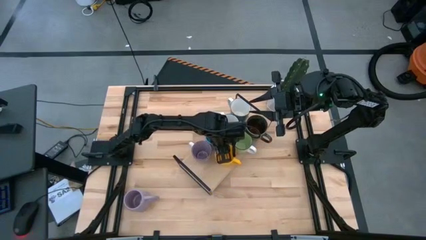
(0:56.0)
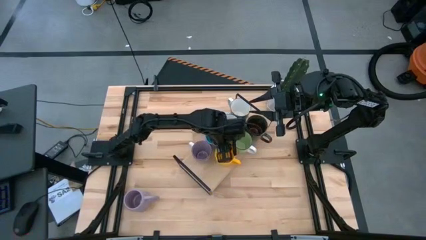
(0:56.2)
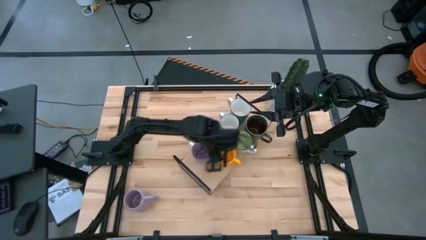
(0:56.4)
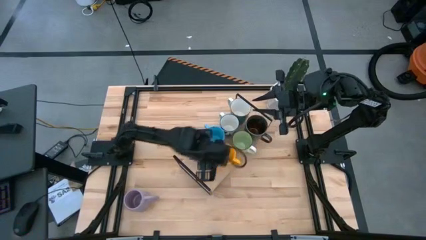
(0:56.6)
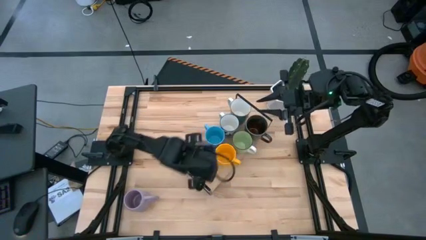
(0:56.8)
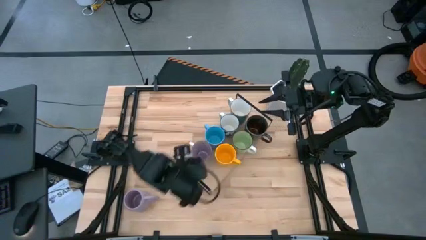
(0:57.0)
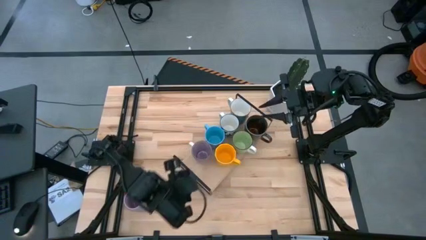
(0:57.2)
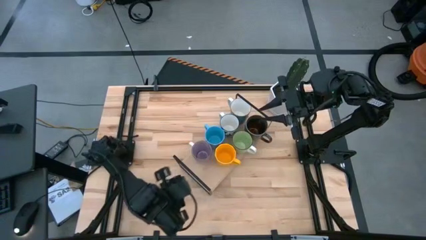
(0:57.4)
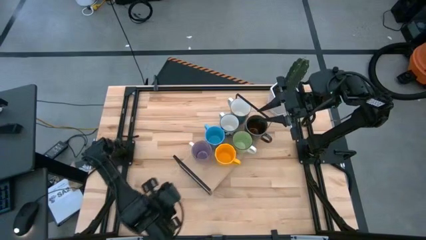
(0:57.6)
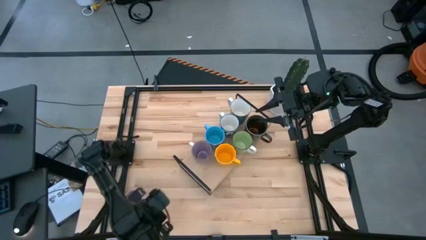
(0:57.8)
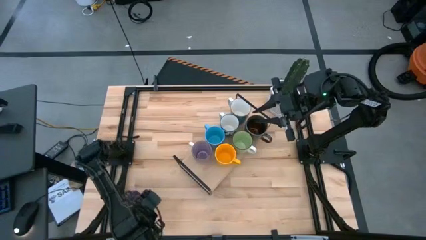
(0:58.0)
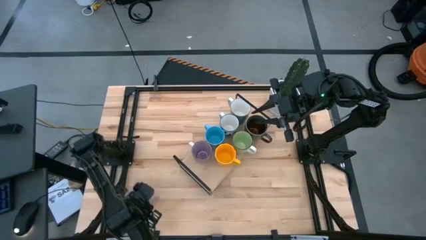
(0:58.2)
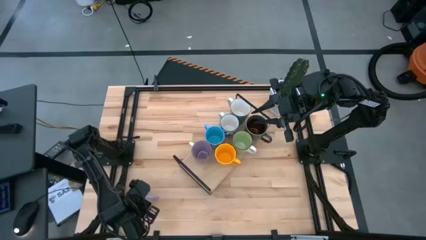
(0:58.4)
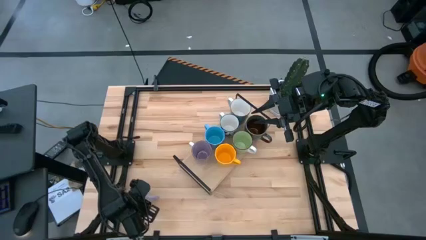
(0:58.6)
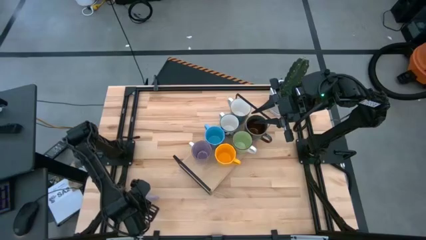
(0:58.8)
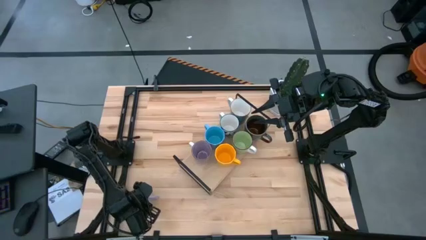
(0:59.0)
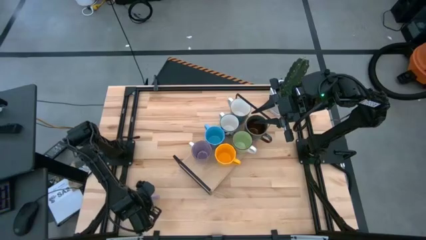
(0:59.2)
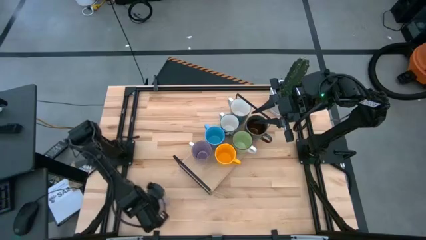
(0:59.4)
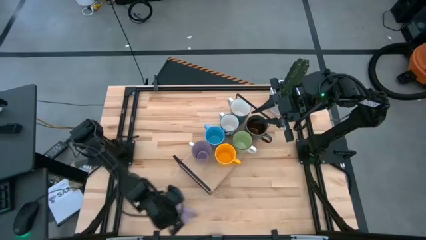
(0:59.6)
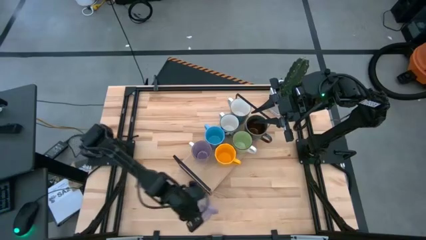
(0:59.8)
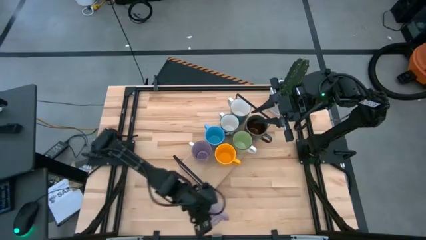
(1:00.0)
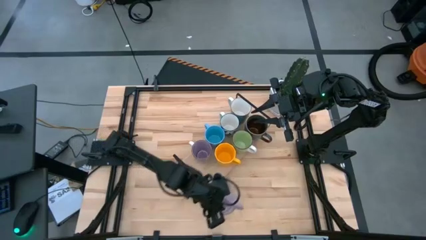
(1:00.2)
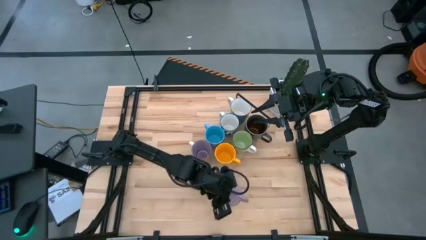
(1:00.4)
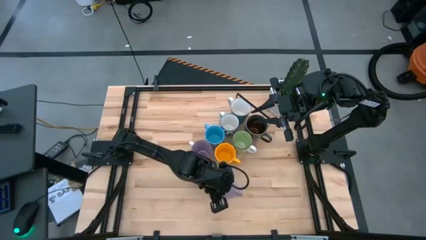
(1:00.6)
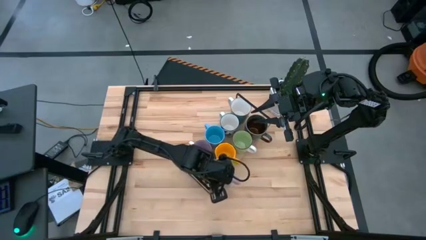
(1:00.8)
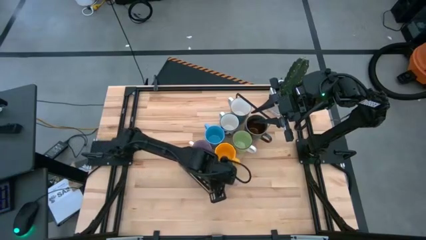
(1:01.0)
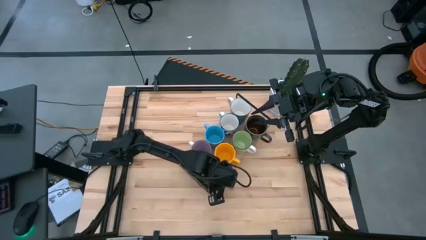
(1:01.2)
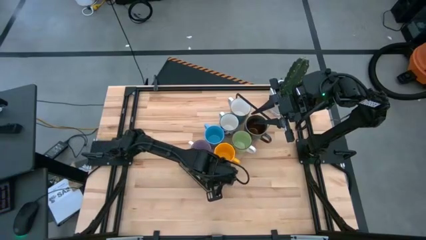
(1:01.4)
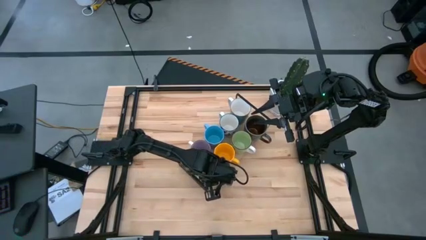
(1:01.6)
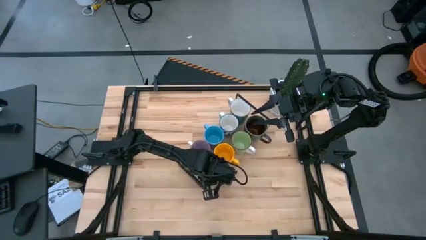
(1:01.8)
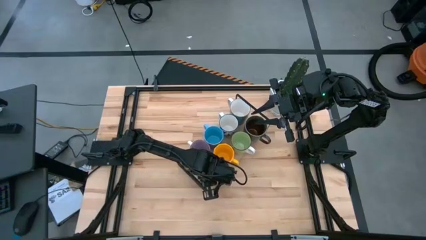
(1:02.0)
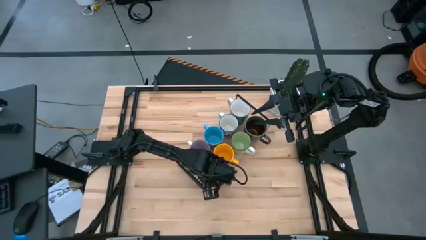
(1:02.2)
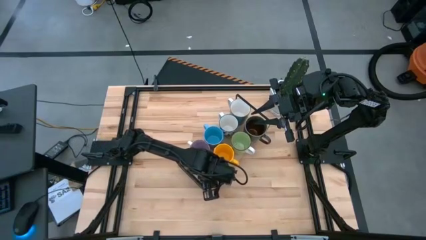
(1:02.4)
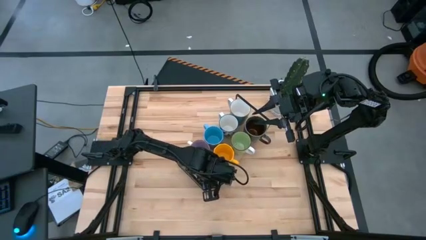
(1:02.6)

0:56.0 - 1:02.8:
Task: Place coffee mugs
Put the purple mug on the shelf

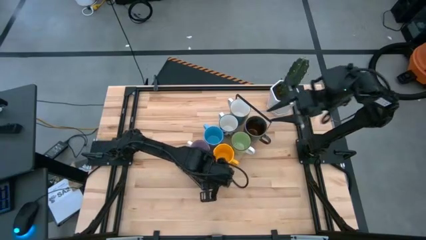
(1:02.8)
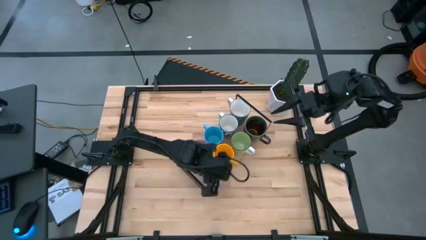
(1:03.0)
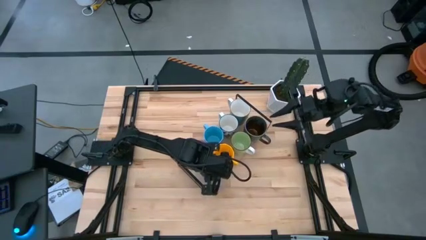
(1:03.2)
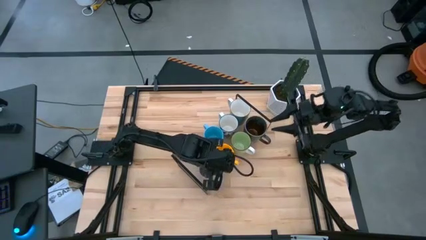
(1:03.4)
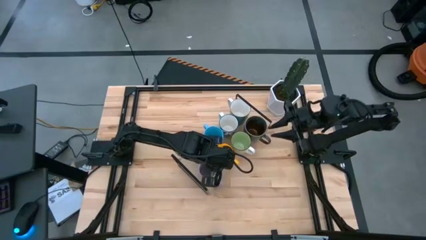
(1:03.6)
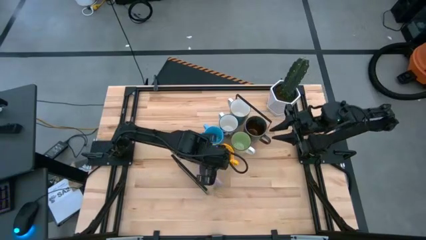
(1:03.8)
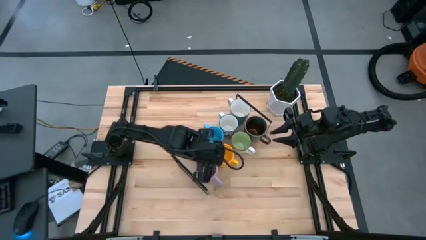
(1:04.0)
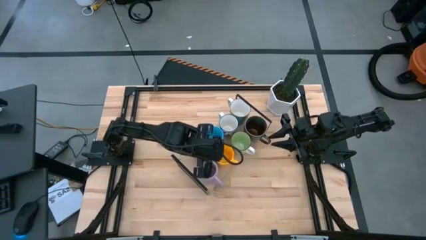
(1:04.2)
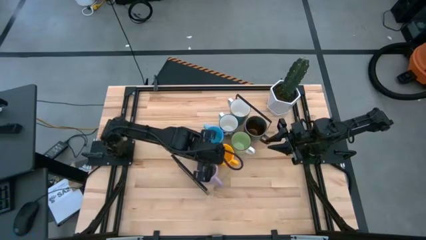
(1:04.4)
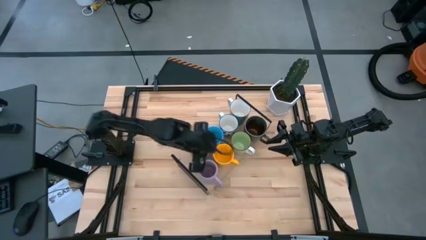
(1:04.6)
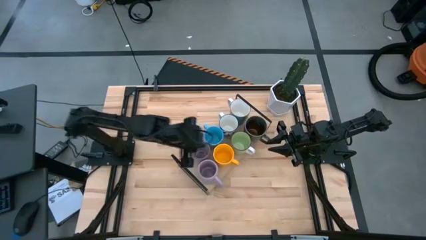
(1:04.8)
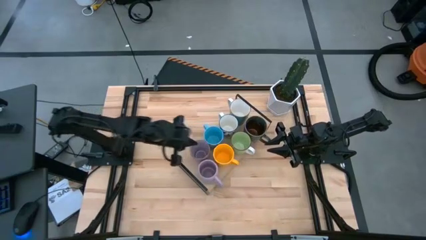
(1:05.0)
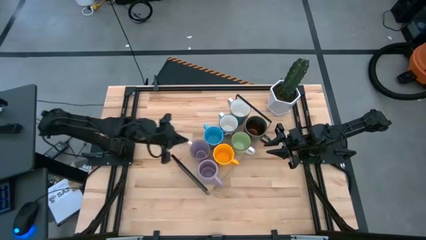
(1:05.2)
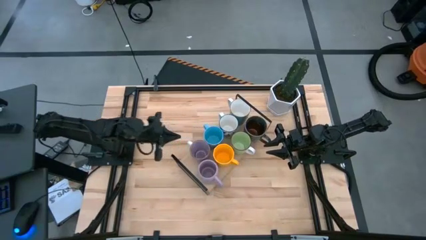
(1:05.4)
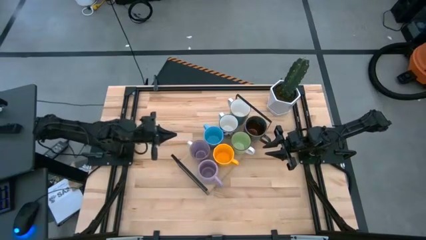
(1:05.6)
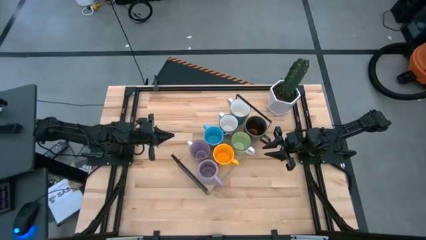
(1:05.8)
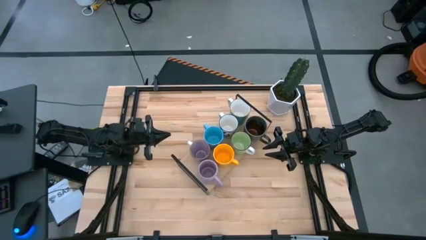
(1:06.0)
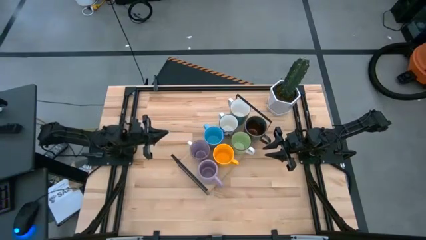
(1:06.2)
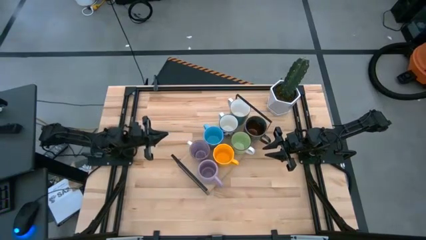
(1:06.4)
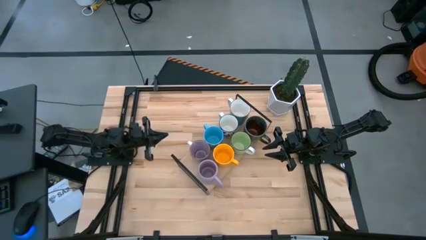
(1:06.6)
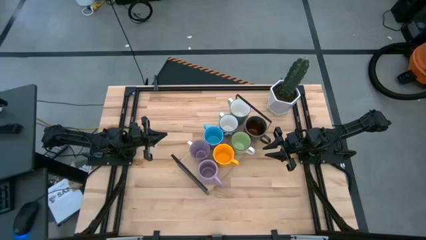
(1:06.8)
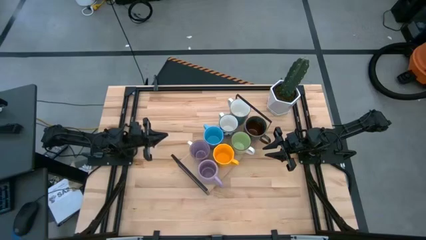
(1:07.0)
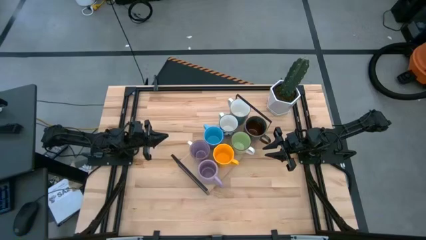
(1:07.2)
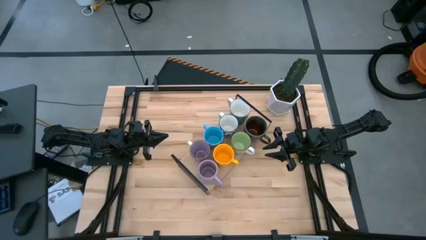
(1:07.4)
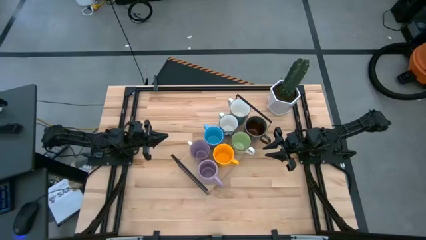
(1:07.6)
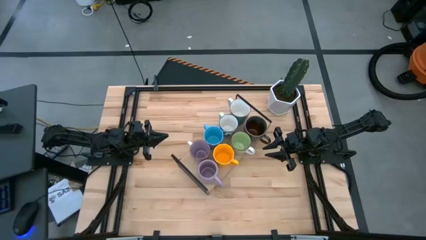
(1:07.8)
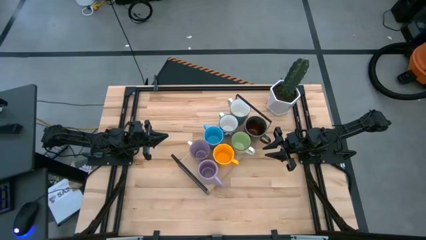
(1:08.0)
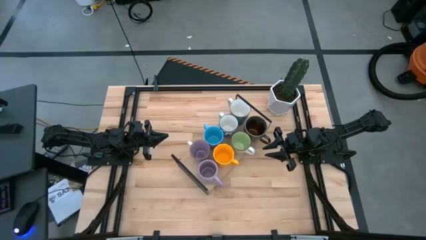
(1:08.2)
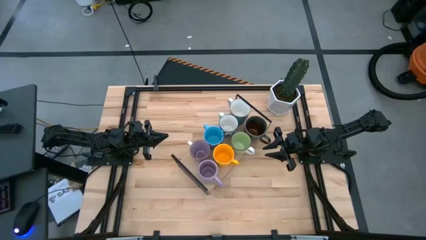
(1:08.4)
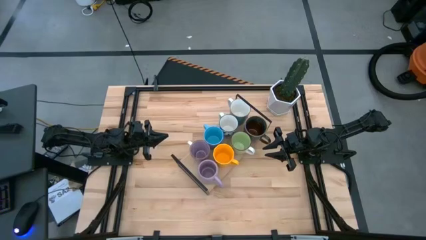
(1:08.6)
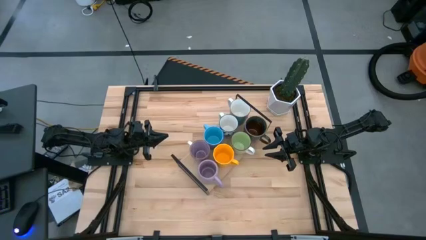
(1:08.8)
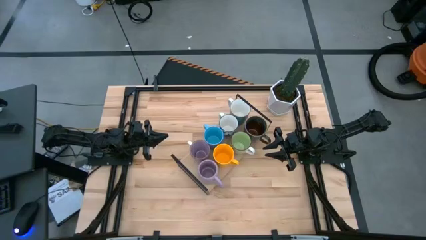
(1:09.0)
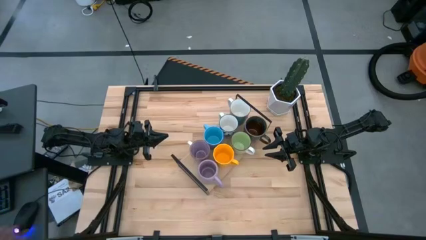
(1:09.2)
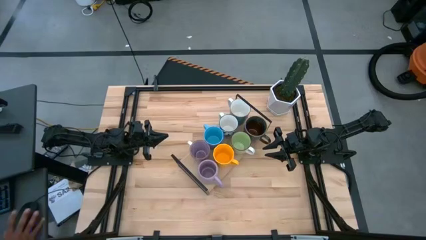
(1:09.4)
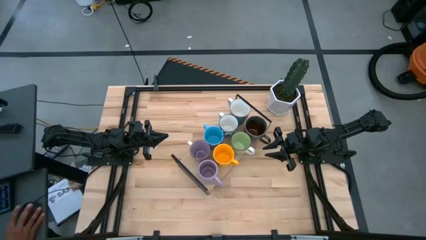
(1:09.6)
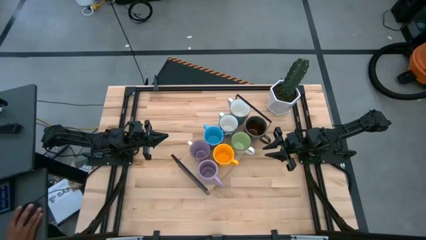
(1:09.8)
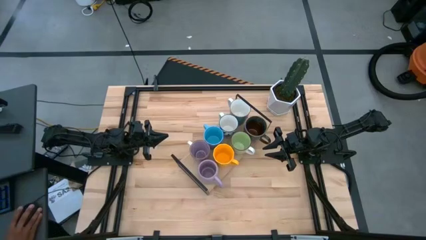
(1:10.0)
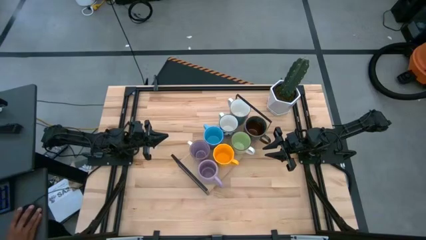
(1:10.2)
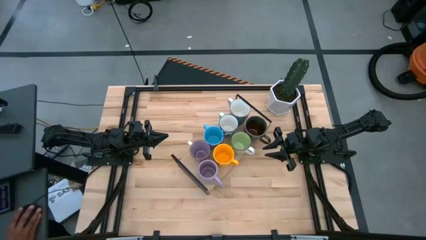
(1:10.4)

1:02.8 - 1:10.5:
Return to Home Position

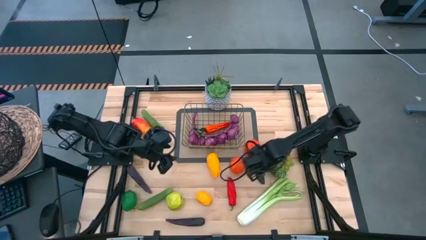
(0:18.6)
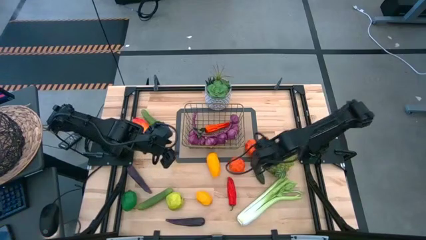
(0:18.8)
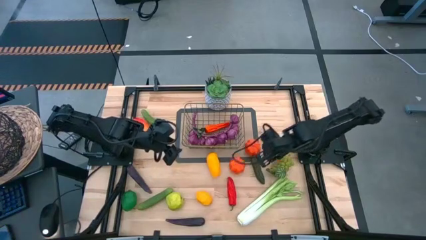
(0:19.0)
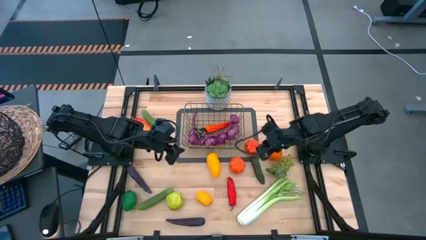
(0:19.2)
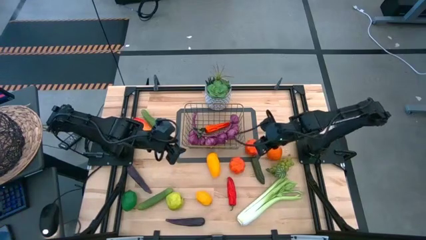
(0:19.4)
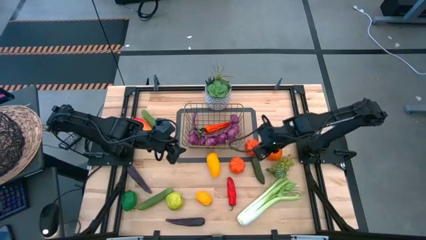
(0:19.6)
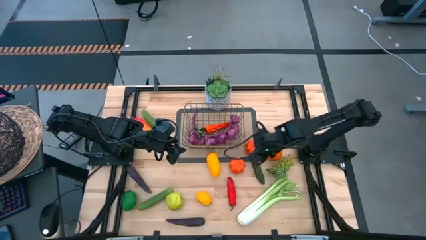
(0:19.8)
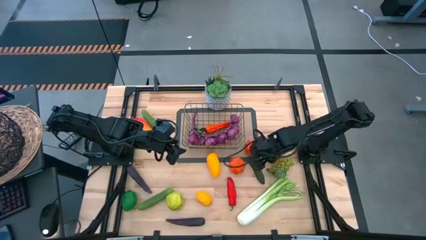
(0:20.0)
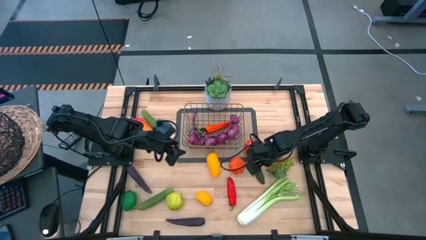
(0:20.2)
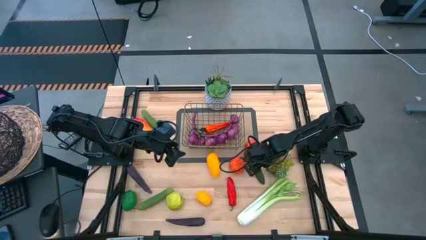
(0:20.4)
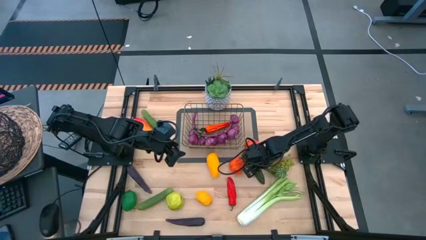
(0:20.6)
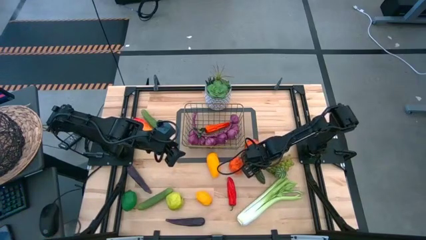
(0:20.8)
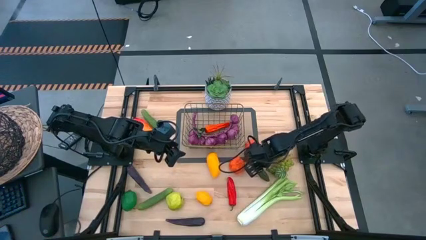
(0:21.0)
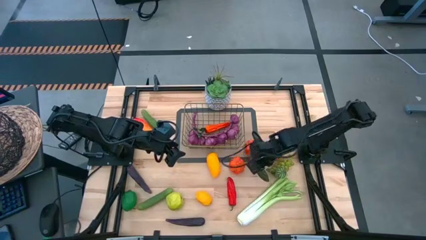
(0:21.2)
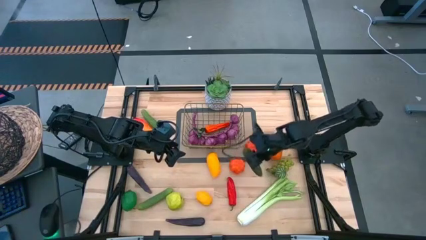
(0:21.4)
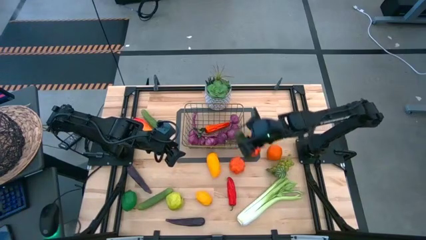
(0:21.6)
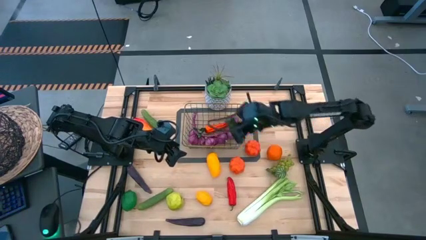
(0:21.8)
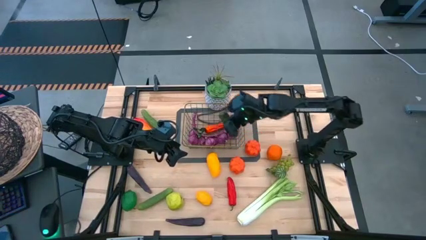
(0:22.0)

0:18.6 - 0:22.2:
Task: Build produce basket
Put the green chili pepper into the wire basket
